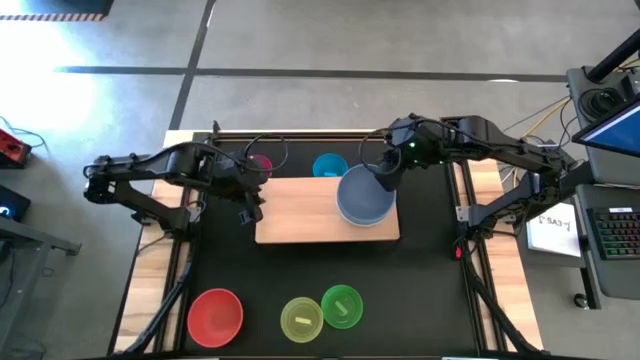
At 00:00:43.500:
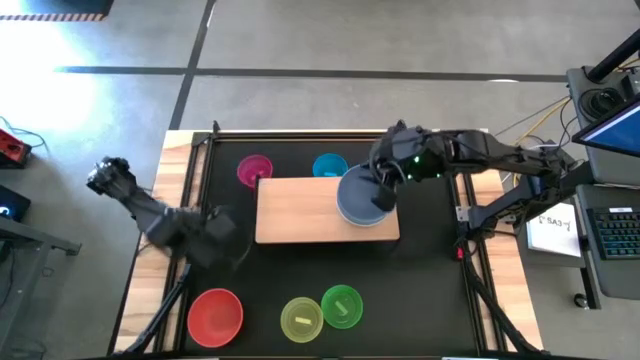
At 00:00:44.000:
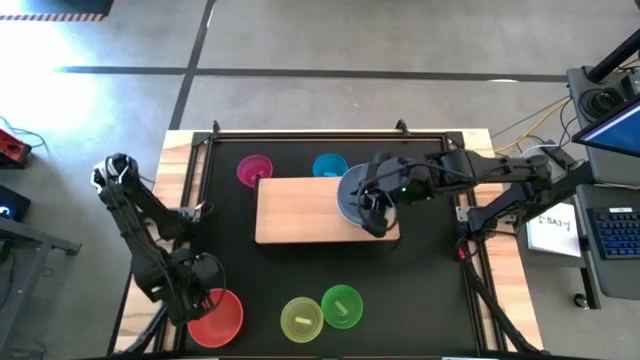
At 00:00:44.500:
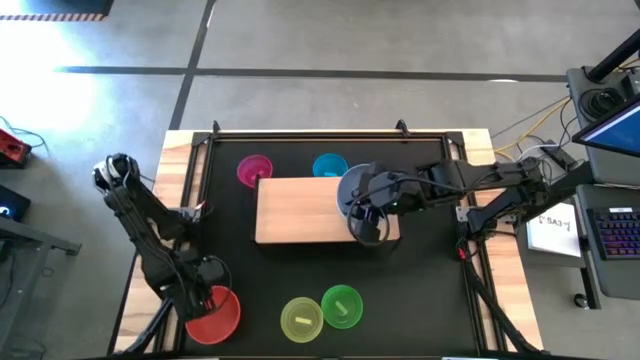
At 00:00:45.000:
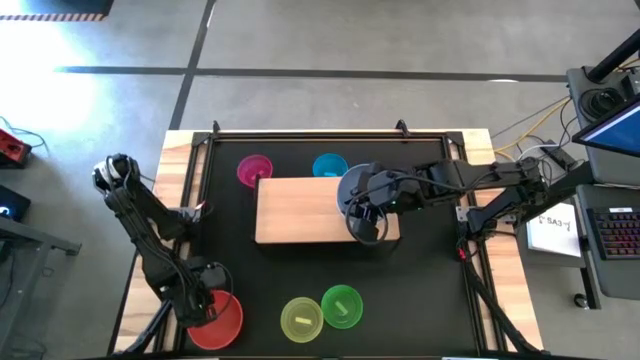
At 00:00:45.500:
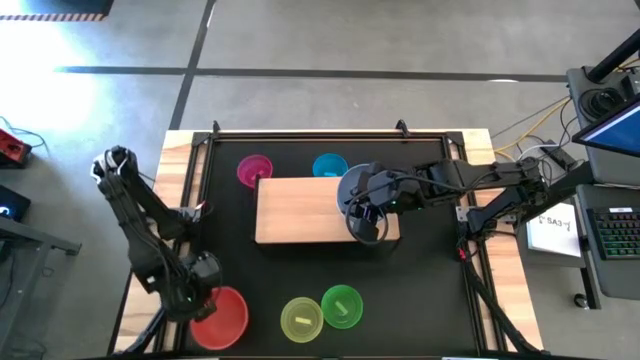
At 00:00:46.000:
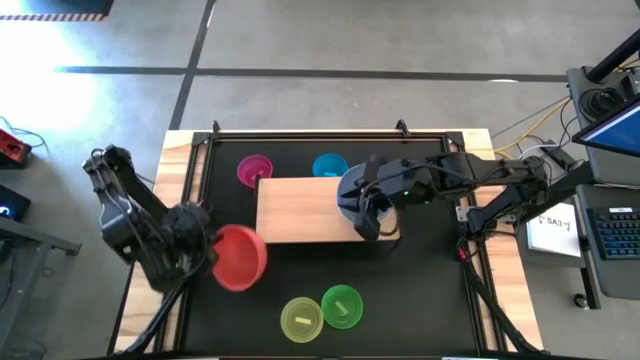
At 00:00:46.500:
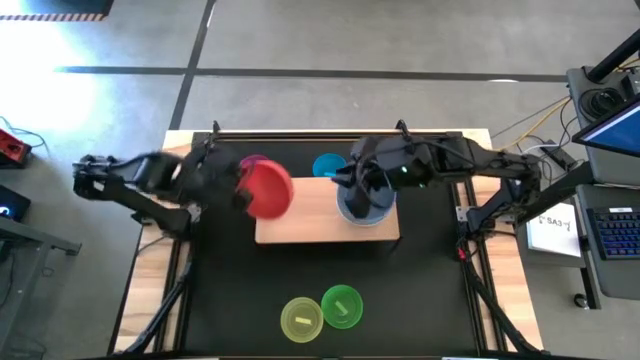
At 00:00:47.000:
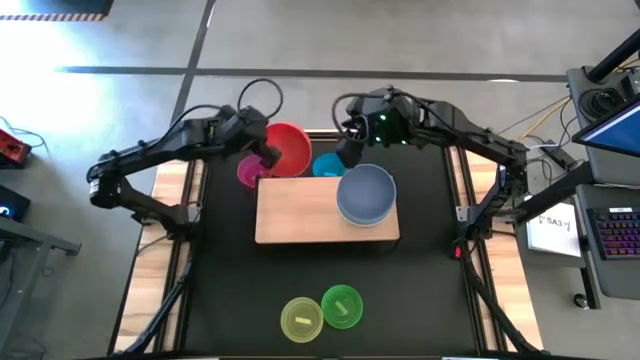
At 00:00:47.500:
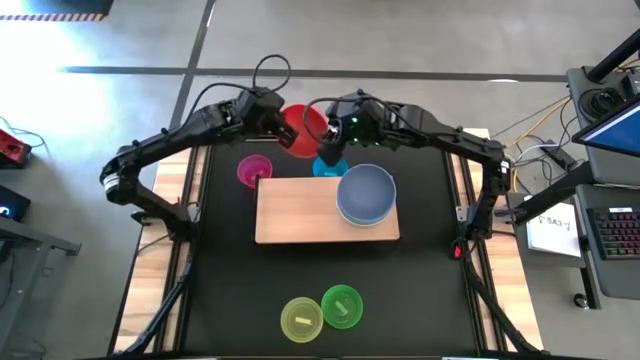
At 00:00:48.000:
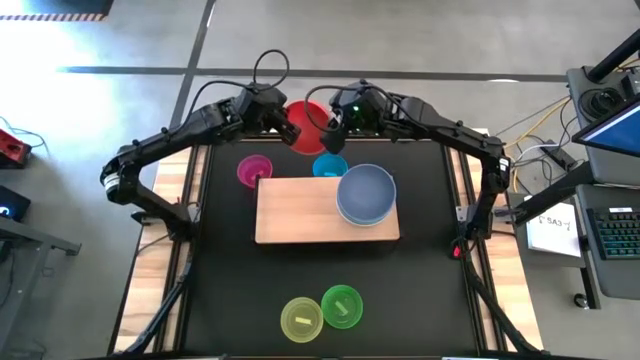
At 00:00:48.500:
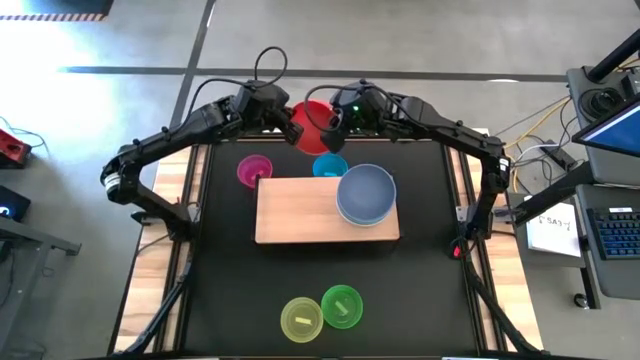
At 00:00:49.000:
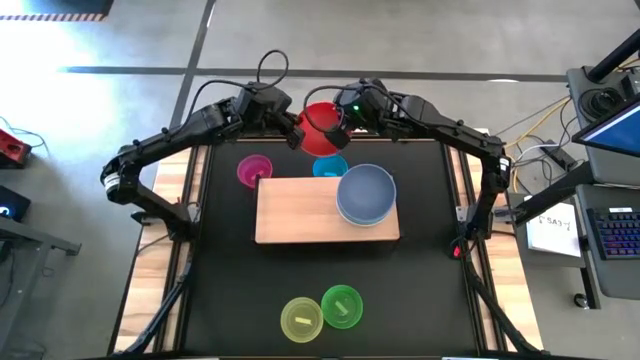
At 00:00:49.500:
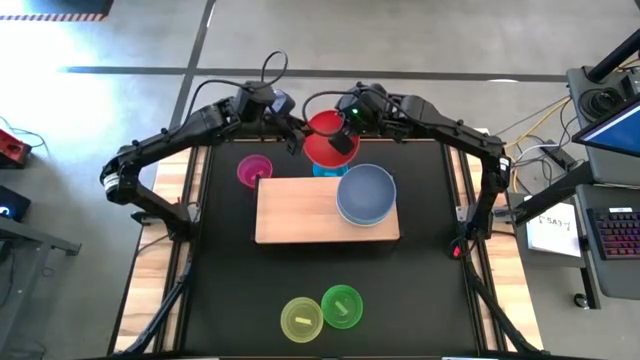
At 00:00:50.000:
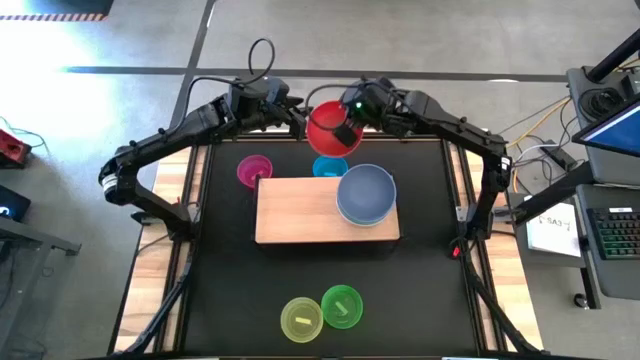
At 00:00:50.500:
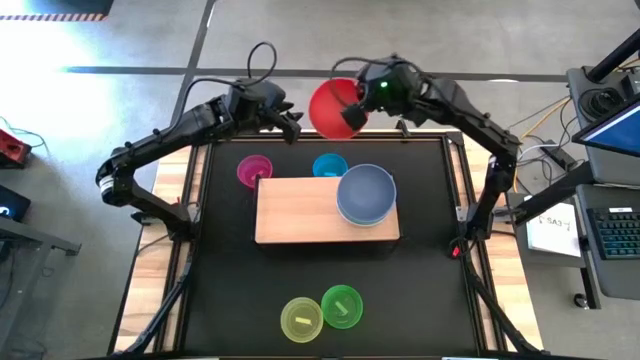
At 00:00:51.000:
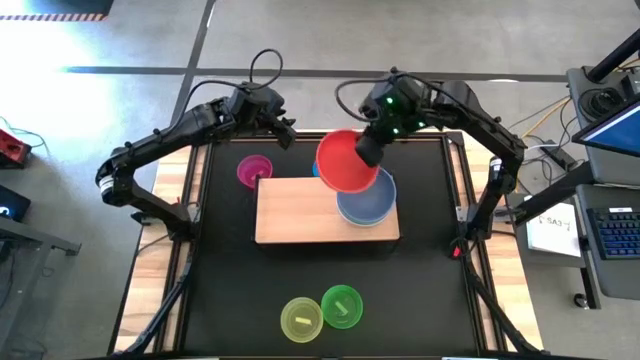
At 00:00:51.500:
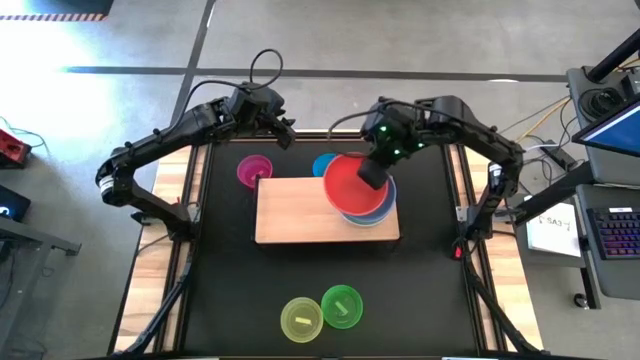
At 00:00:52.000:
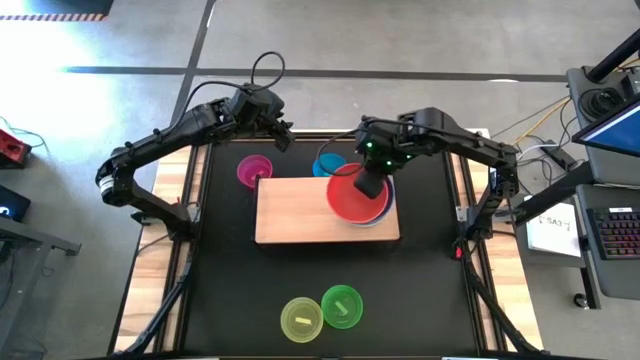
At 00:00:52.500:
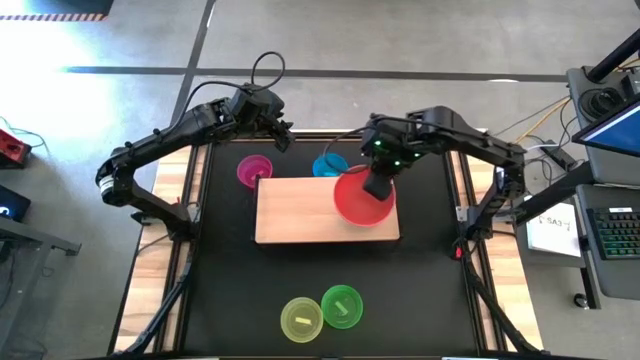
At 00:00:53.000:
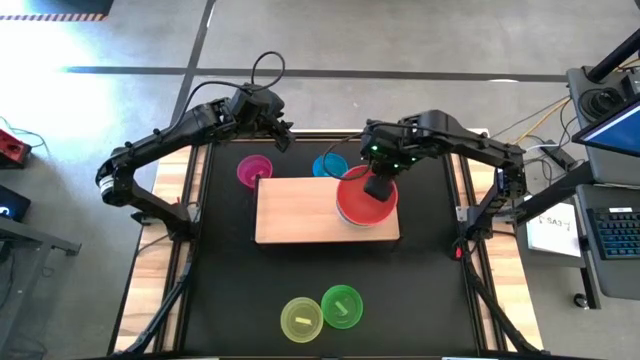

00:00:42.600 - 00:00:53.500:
Task: Place and stack bowls onto a shelf
Stack the large orange bowl on top of the large blue bowl on the shelf

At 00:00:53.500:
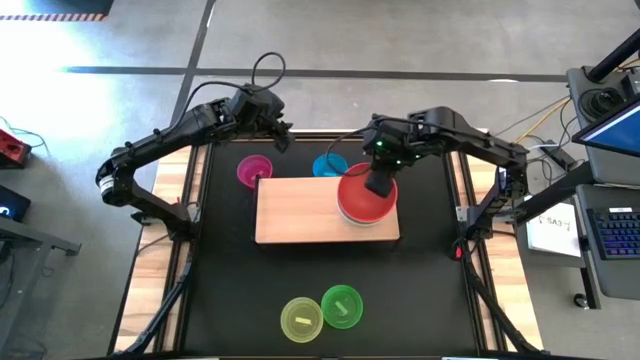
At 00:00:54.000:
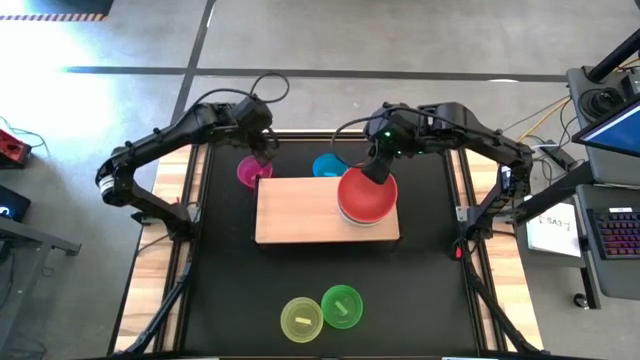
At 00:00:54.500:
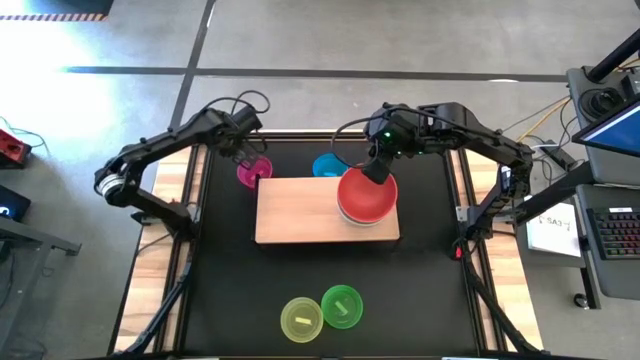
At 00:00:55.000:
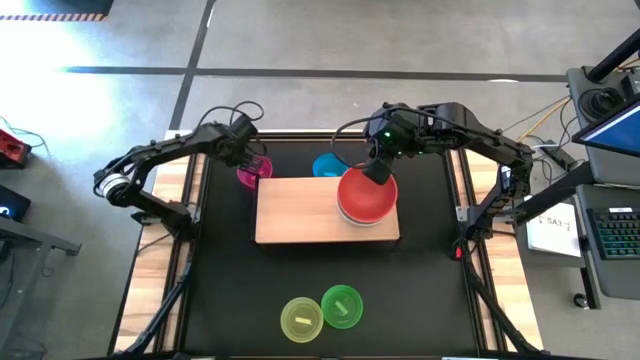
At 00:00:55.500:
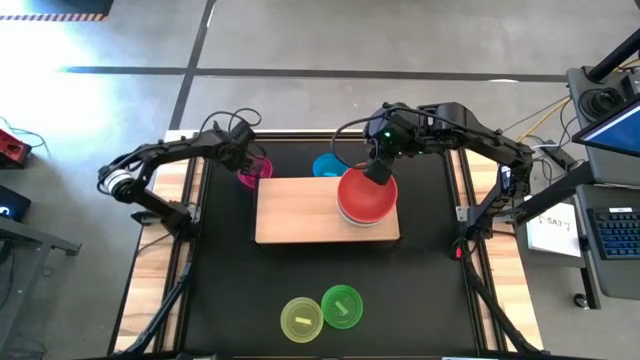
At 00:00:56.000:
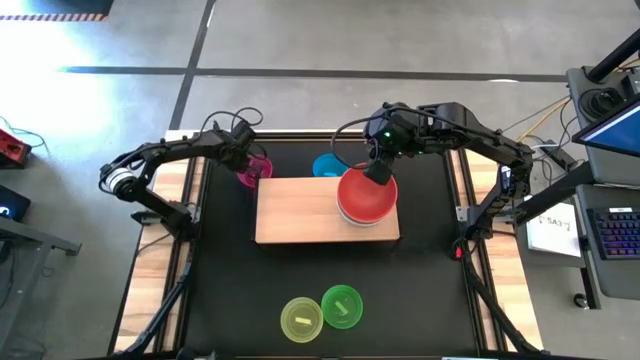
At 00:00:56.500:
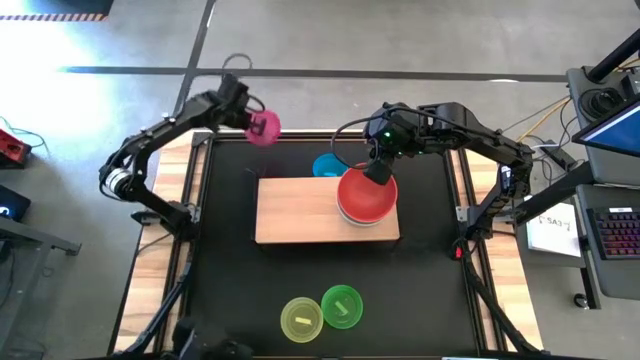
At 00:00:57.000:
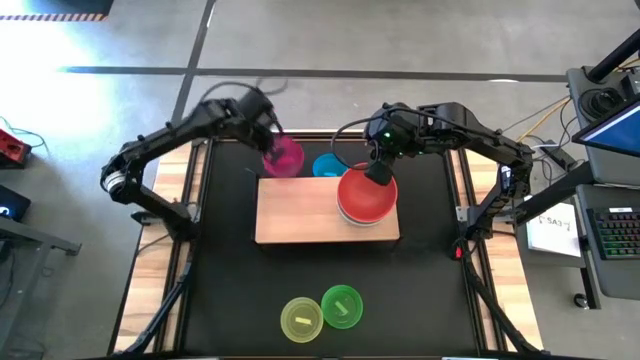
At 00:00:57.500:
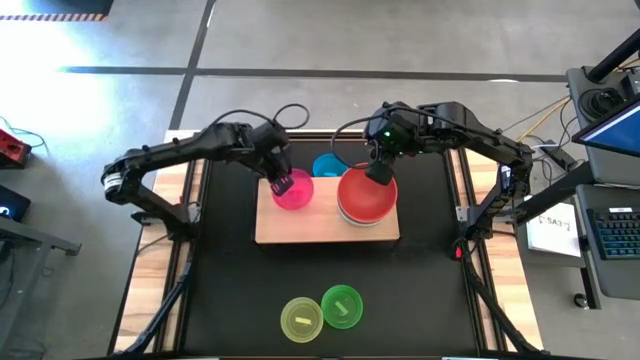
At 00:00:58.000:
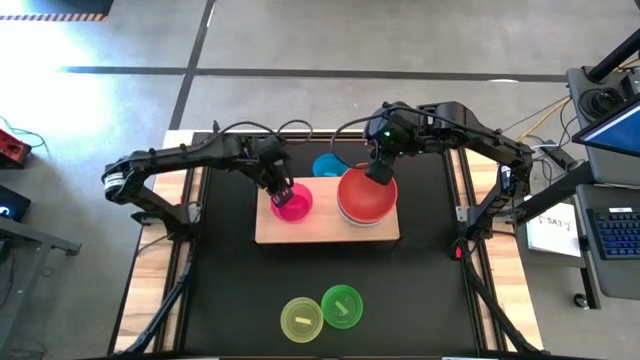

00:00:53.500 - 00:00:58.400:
Put the small pink bowl on the shelf

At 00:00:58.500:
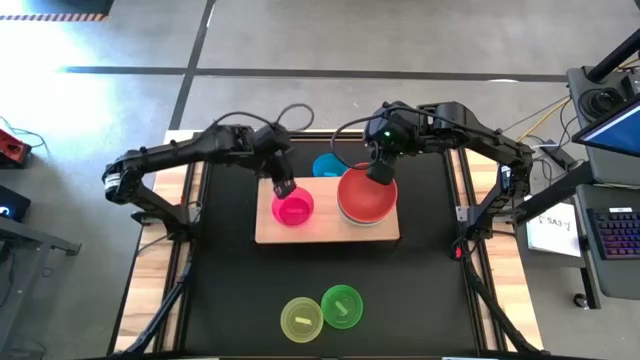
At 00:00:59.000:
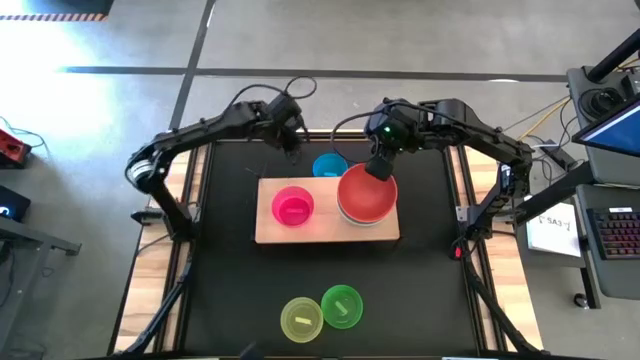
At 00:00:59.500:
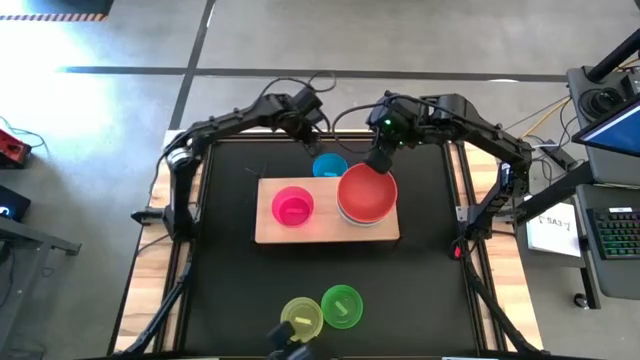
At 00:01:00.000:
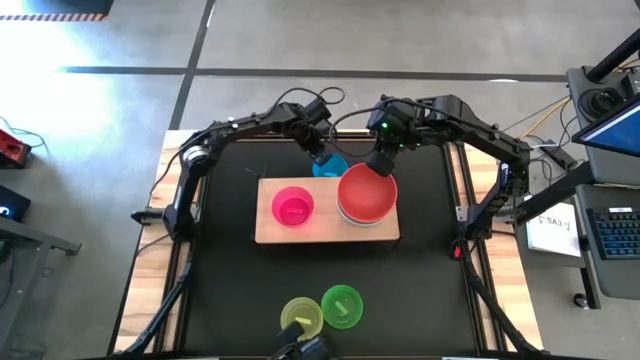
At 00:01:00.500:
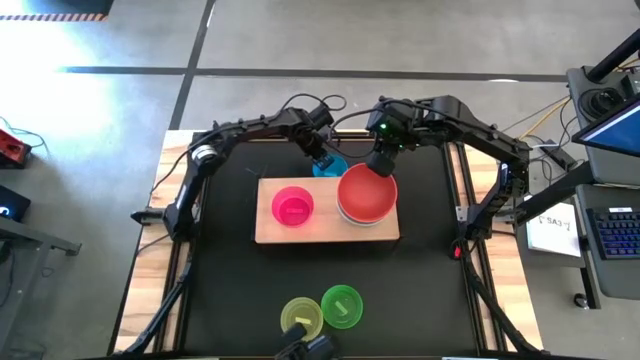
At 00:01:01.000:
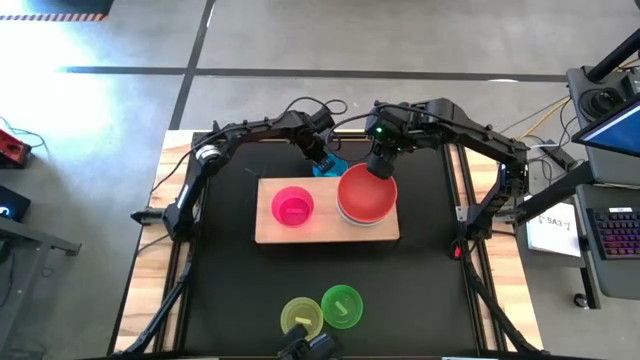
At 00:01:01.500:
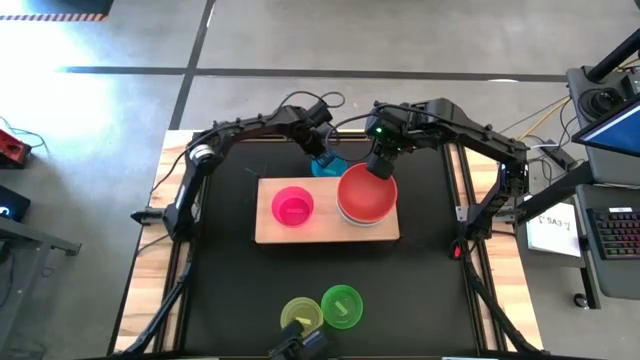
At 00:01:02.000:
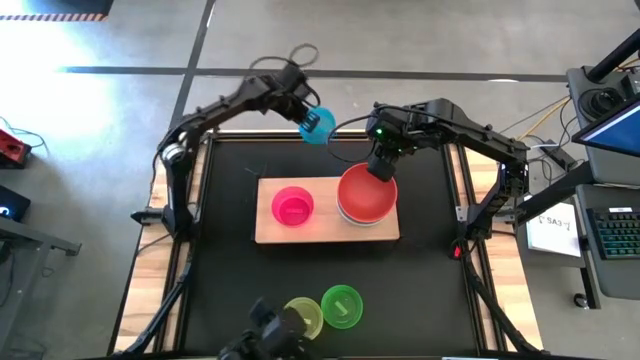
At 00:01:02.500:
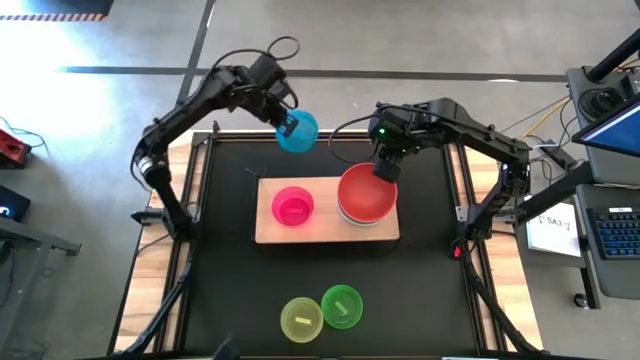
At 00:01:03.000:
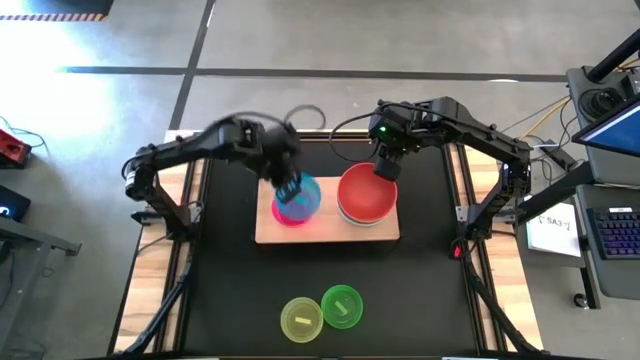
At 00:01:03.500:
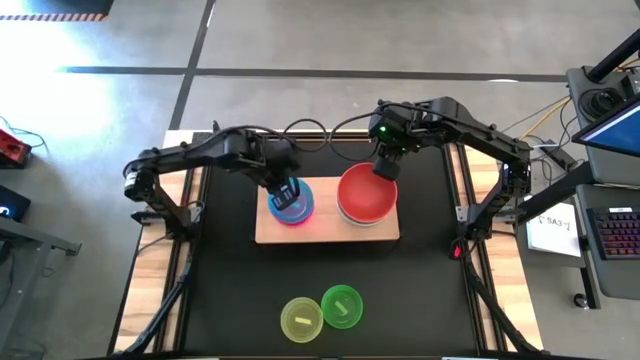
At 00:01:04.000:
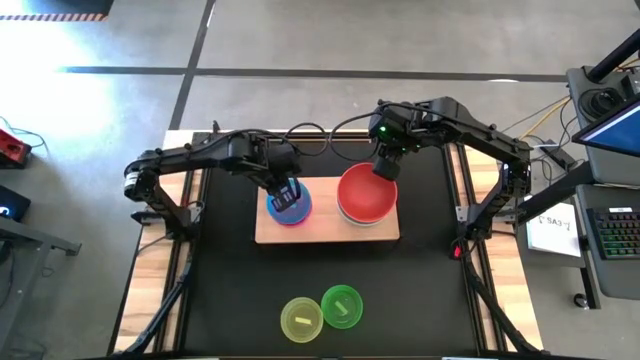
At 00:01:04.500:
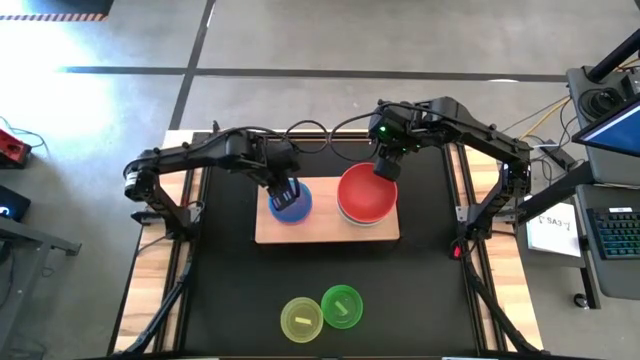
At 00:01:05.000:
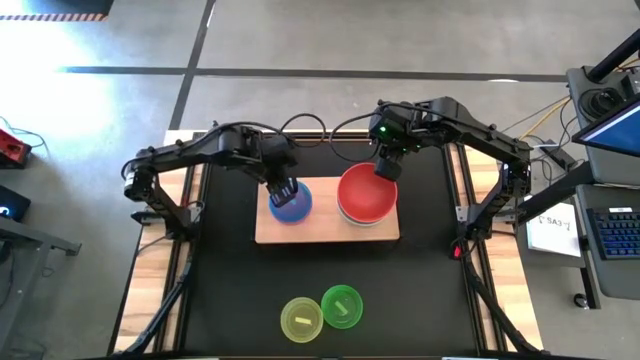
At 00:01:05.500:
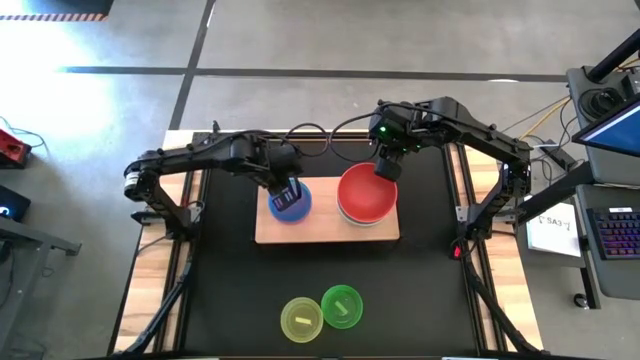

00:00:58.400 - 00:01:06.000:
Stack the small light blue bowl on top of the small pink bowl on the shelf
